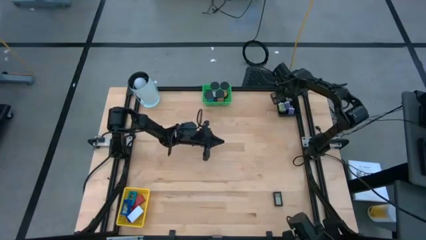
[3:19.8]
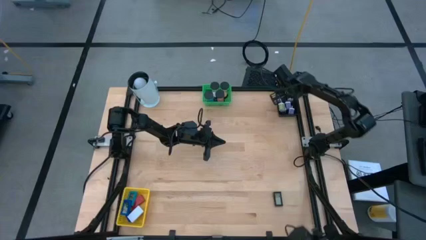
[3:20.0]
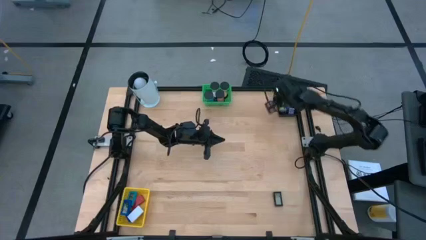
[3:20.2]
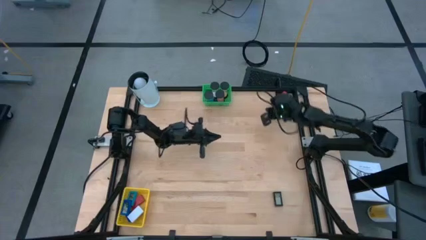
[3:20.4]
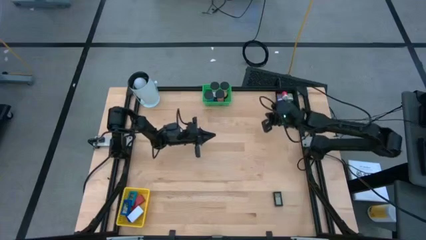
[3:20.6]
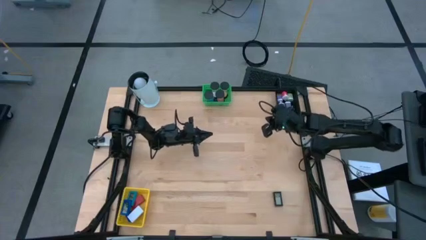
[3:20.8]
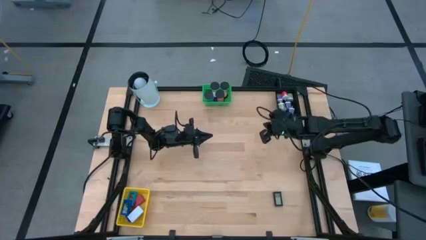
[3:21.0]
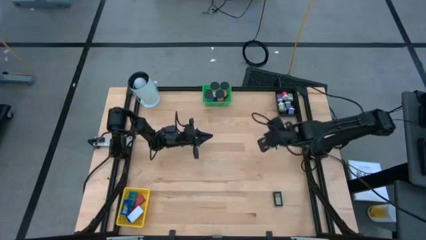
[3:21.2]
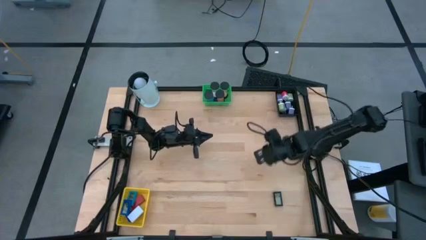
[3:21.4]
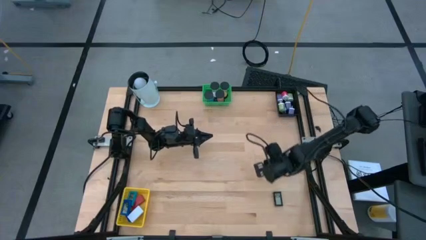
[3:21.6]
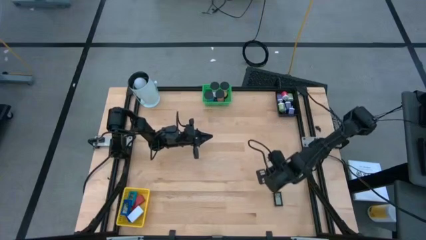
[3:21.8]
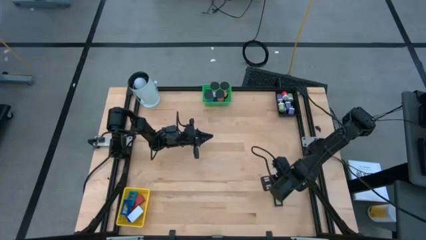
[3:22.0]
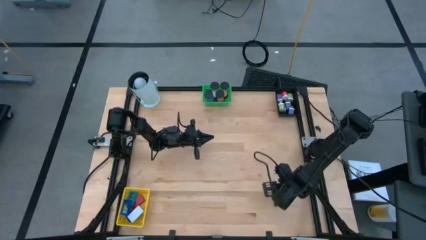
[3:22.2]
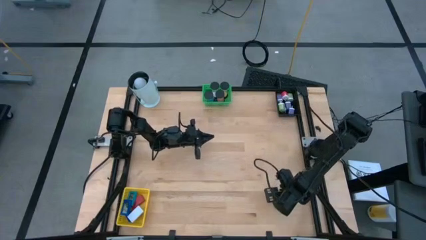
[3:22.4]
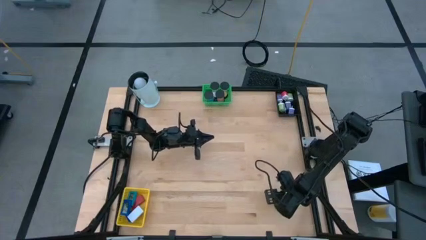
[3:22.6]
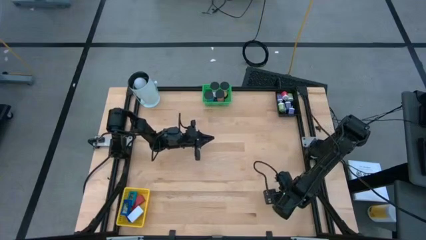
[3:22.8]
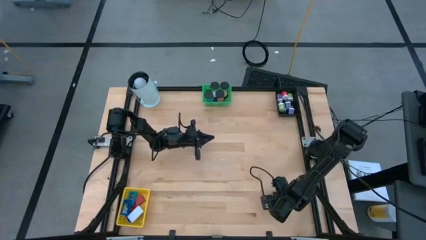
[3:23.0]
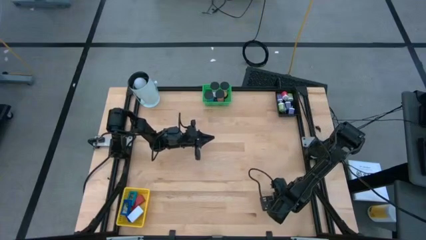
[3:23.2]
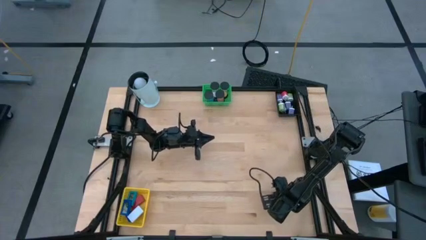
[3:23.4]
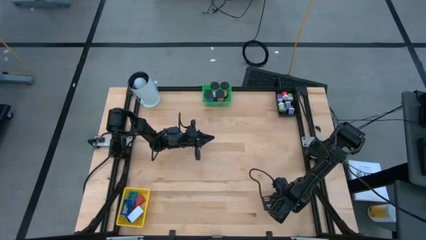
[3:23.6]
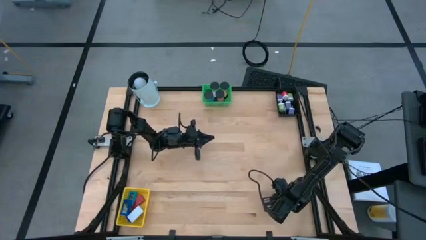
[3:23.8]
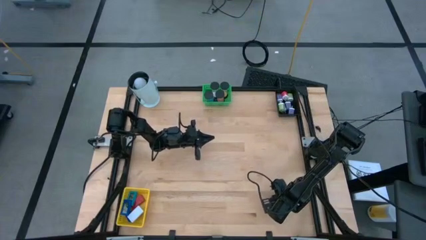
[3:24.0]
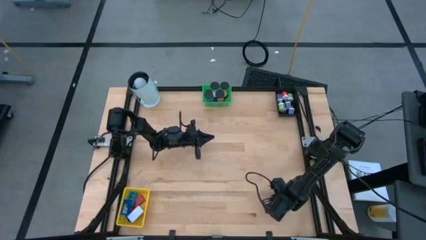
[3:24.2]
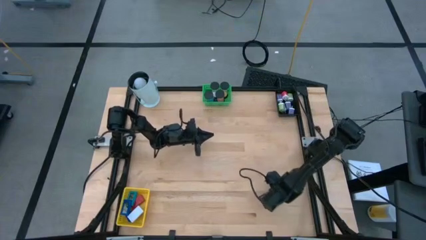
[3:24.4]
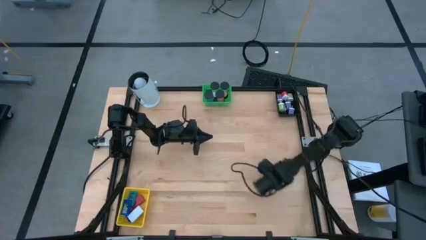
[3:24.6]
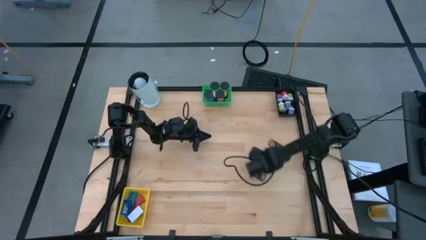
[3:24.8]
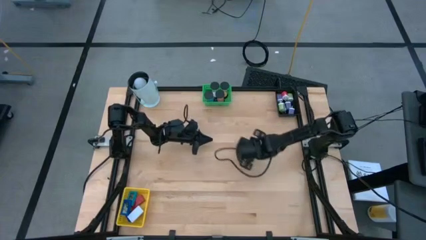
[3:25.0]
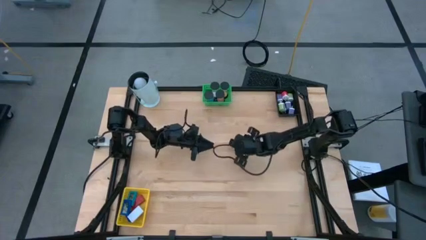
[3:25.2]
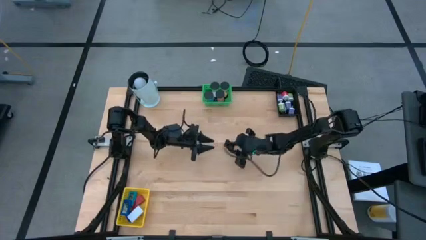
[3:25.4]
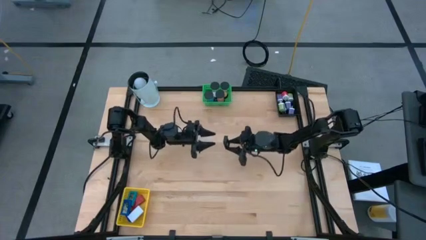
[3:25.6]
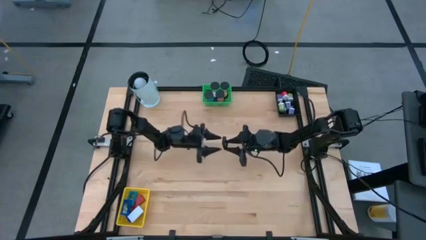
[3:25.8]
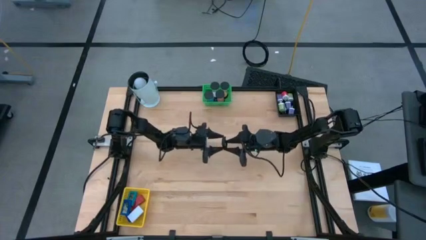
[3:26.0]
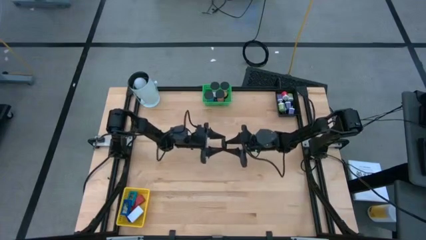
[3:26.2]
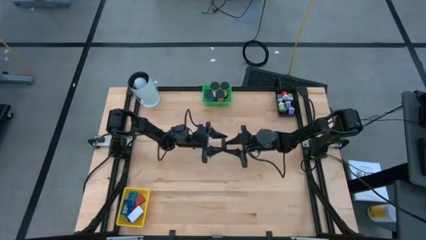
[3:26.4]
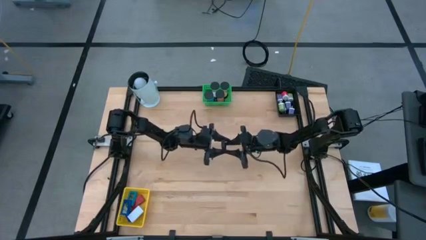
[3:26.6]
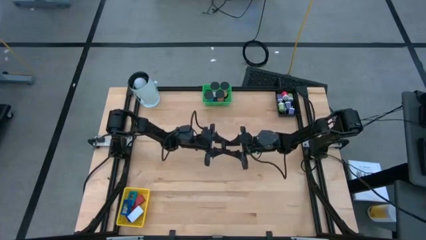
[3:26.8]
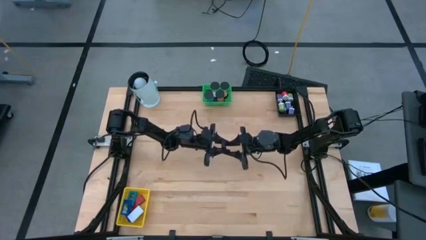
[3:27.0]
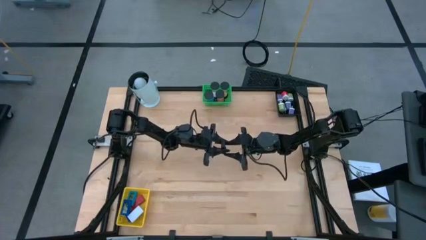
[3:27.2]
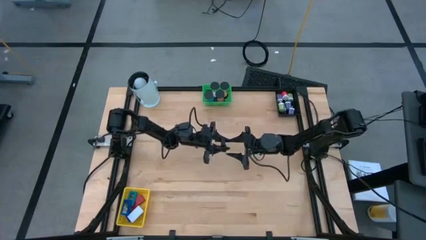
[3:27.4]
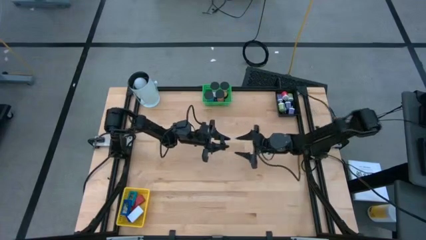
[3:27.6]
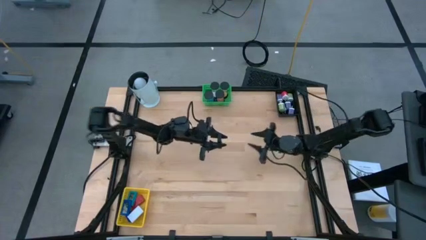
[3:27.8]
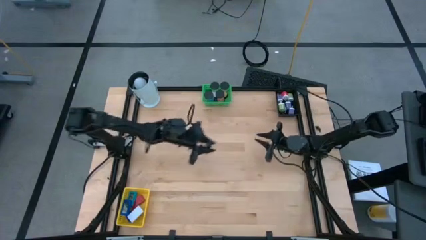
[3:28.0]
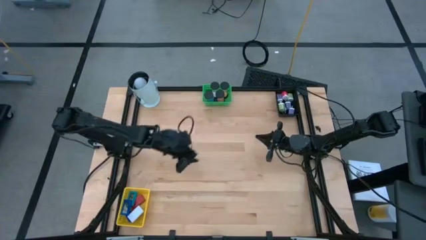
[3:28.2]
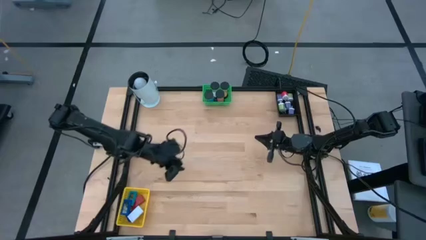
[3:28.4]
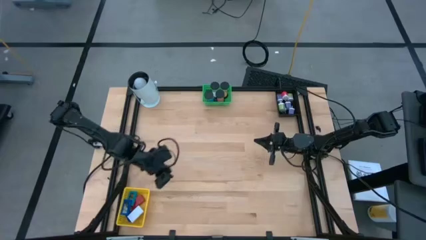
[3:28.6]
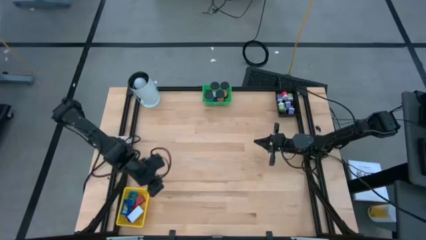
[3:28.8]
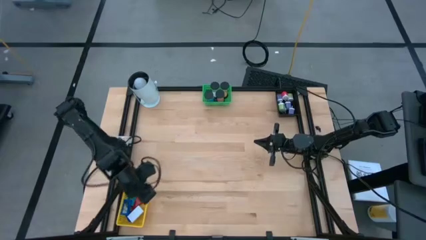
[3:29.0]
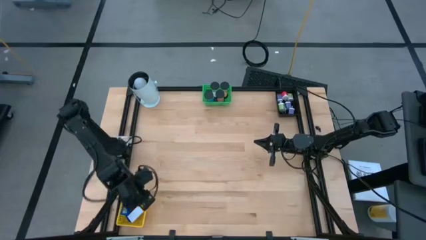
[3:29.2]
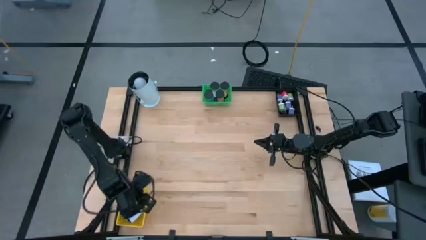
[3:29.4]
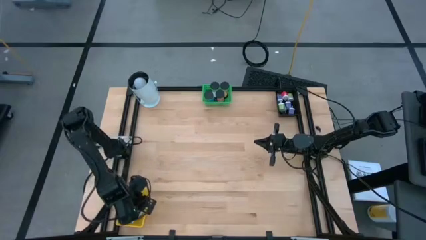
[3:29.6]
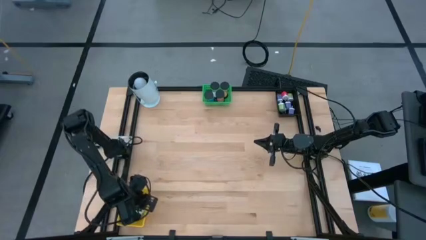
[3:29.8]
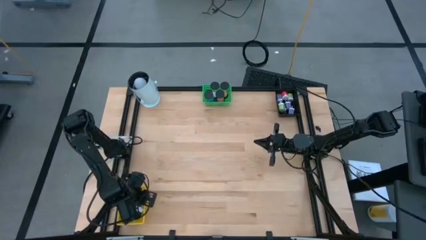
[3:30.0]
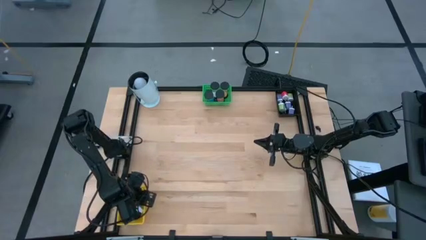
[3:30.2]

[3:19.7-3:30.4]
Task: Pick & Place Office items
Put the black timer into the yellow basket

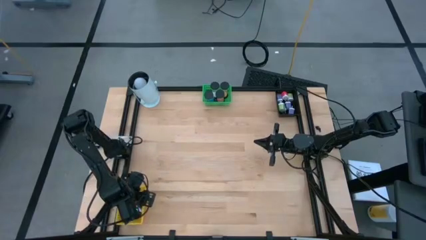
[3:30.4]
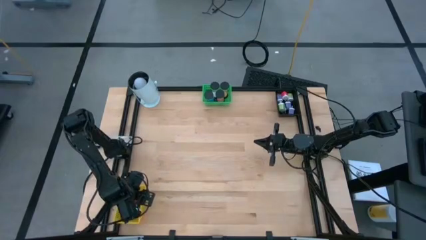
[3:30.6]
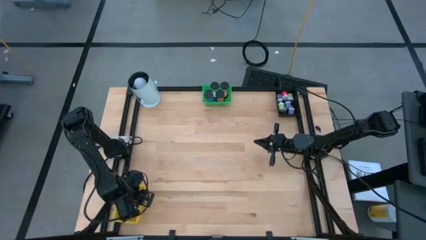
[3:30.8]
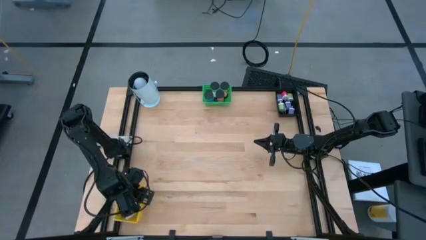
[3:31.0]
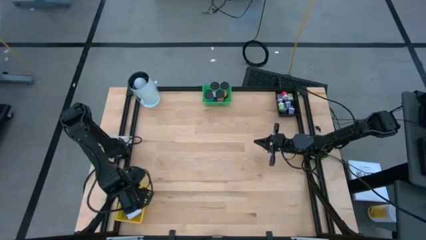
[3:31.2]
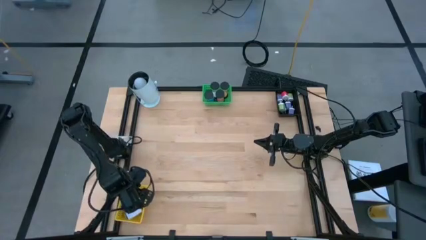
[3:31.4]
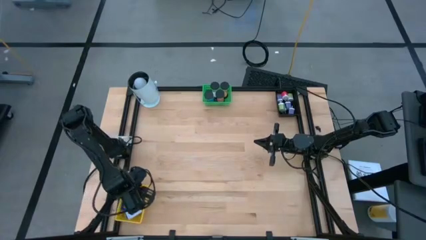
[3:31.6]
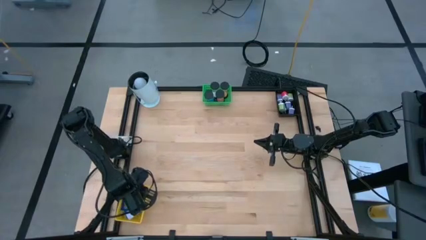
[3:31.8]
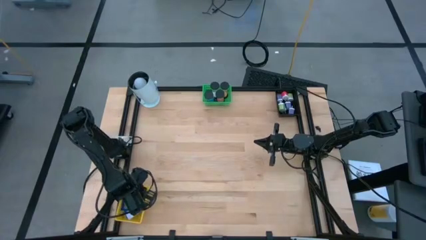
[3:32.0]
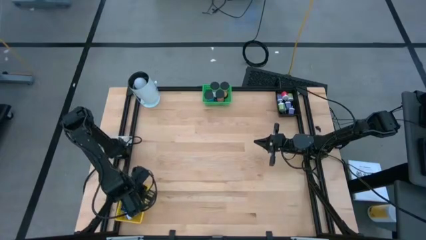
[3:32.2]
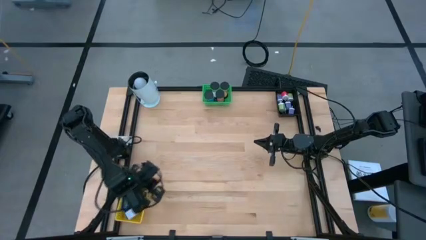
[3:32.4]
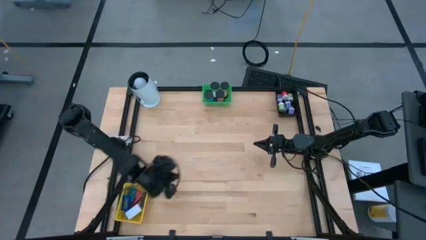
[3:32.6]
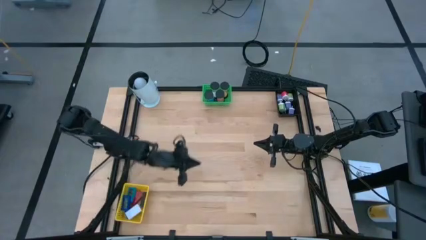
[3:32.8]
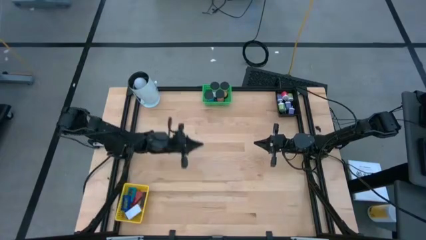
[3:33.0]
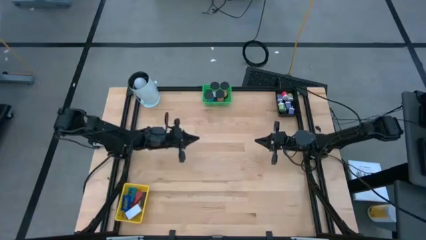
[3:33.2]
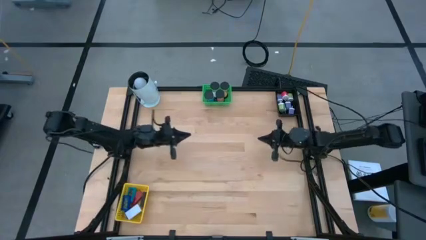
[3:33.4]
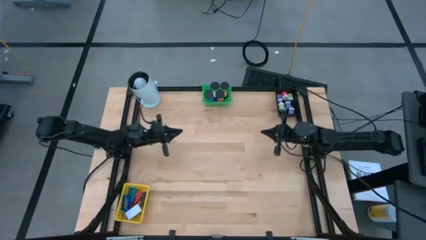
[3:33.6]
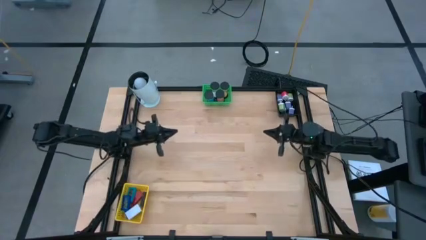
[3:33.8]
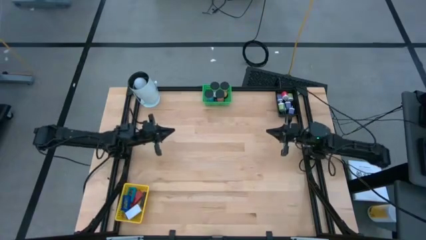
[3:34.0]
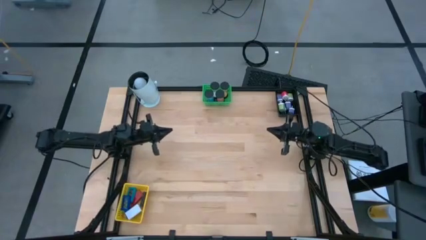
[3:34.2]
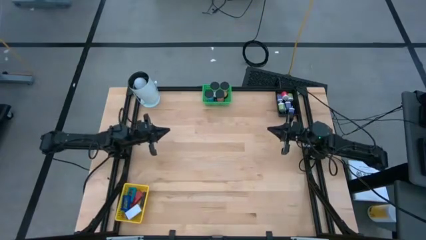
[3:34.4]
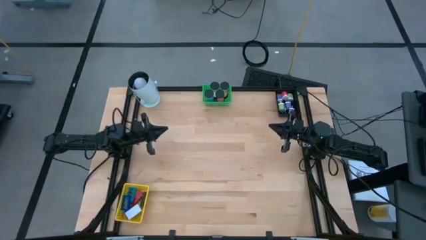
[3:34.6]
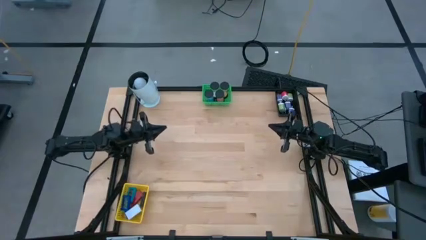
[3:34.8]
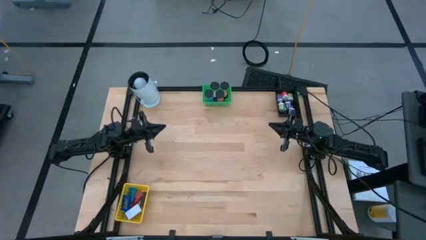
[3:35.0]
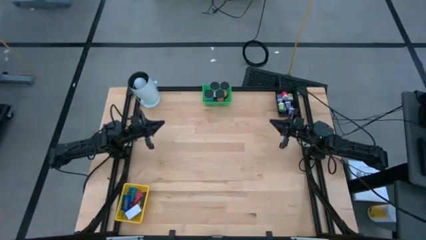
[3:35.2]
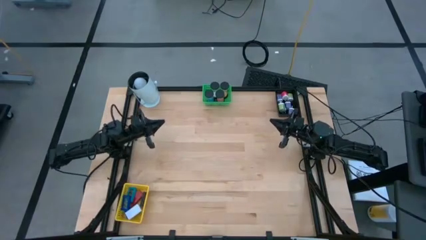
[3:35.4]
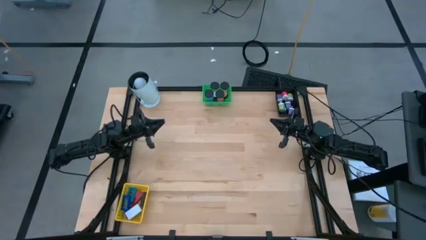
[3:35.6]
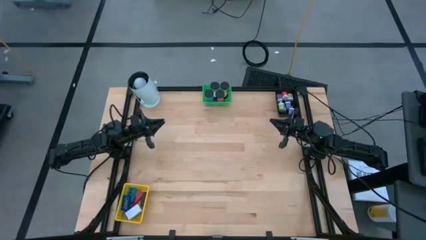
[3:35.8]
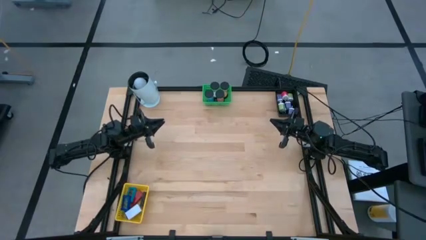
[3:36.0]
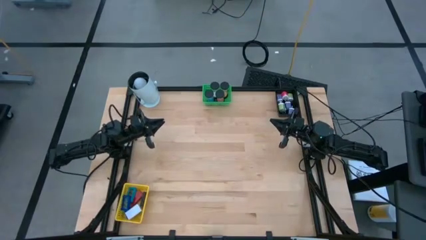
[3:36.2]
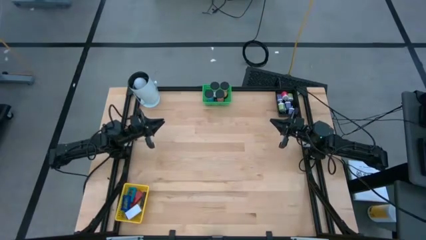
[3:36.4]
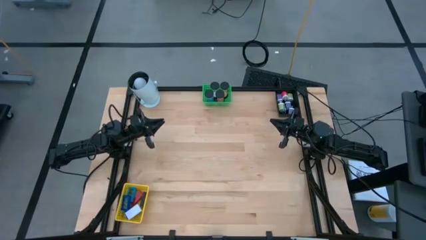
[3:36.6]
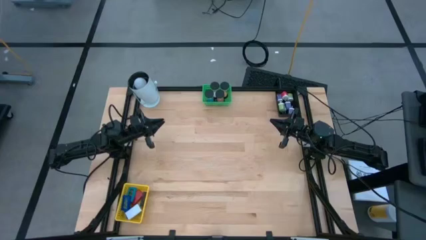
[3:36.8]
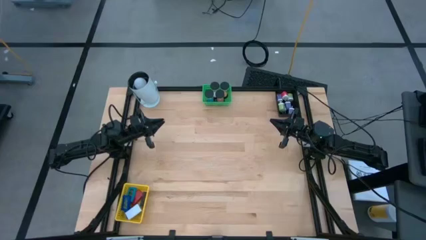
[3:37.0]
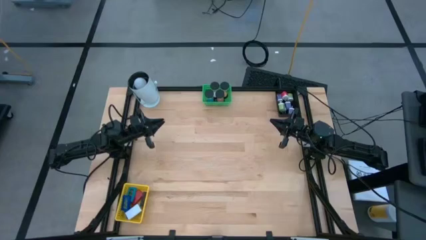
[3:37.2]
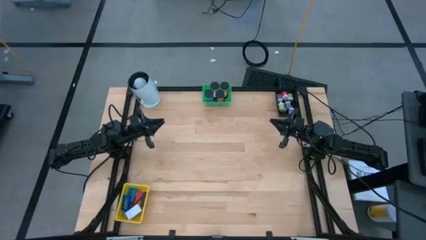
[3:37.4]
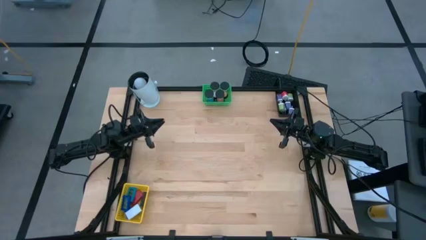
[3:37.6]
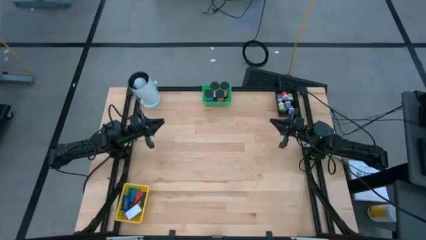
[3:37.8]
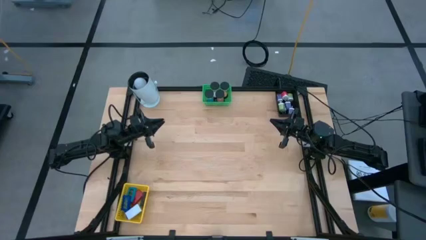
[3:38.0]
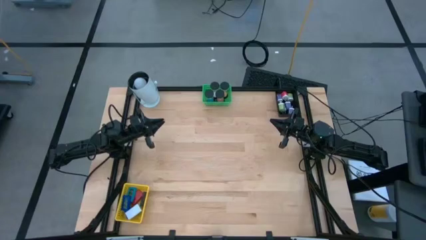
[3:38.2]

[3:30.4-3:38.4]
Return to Home Position
